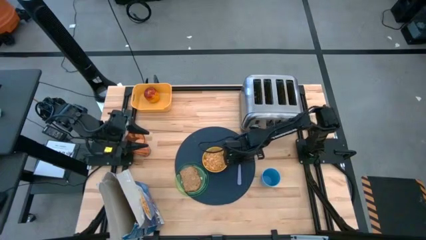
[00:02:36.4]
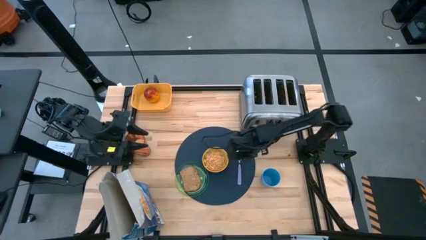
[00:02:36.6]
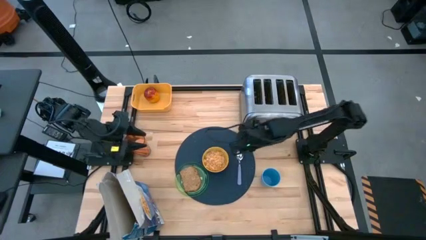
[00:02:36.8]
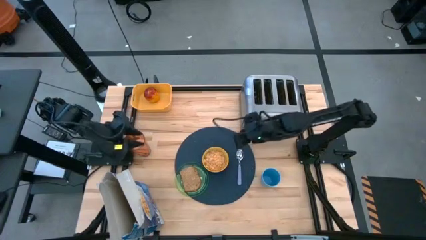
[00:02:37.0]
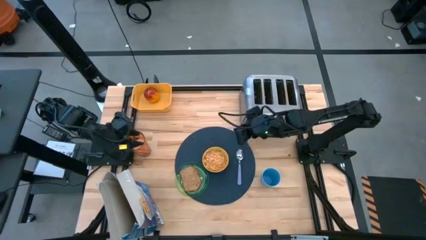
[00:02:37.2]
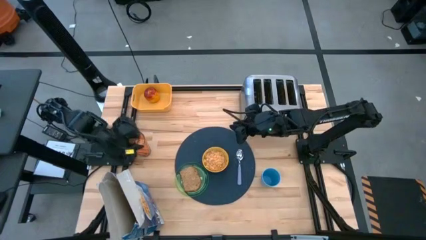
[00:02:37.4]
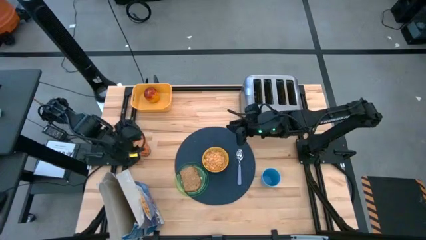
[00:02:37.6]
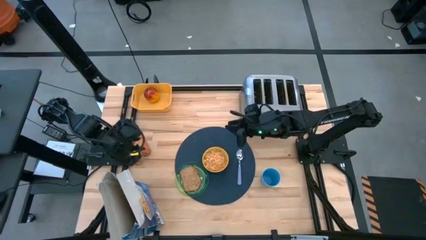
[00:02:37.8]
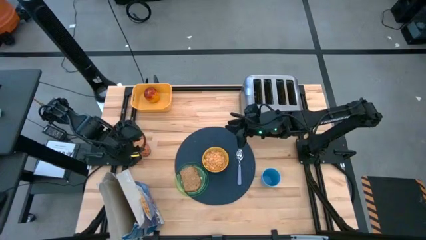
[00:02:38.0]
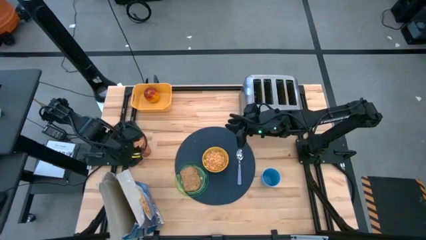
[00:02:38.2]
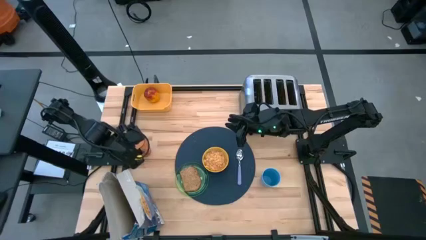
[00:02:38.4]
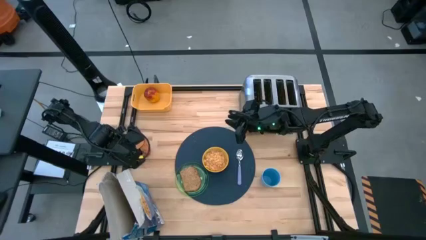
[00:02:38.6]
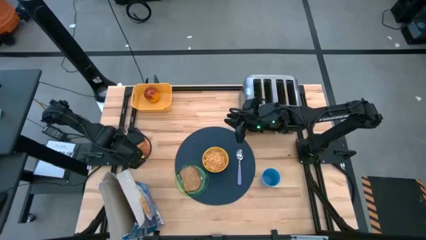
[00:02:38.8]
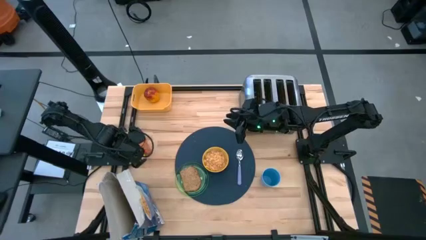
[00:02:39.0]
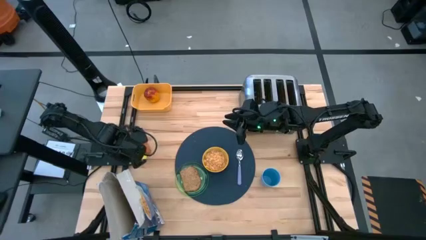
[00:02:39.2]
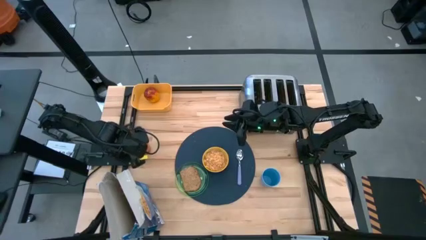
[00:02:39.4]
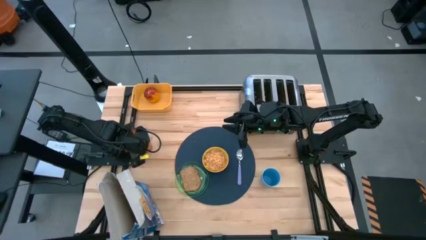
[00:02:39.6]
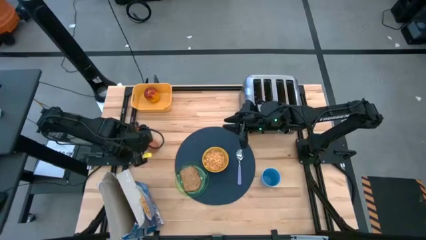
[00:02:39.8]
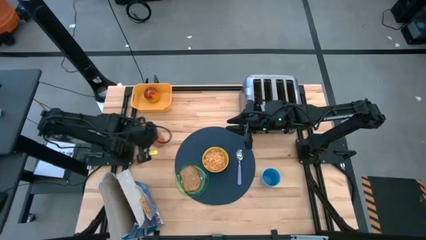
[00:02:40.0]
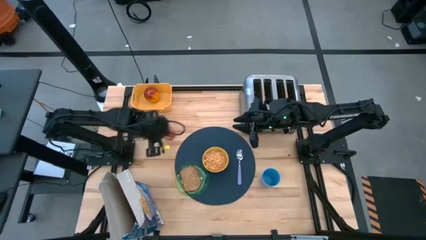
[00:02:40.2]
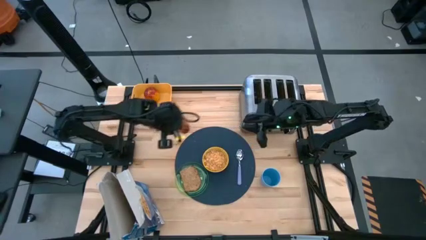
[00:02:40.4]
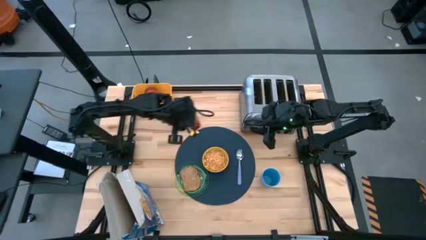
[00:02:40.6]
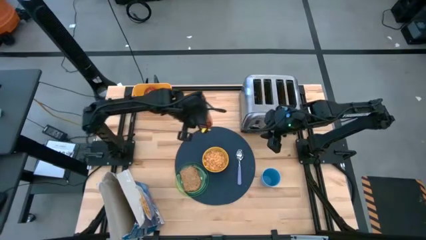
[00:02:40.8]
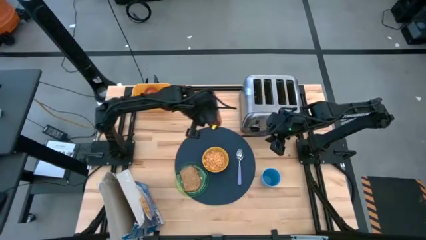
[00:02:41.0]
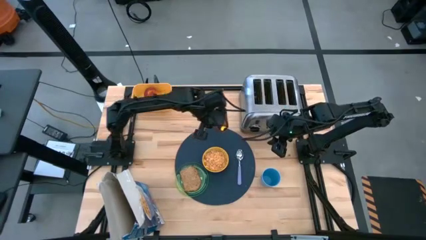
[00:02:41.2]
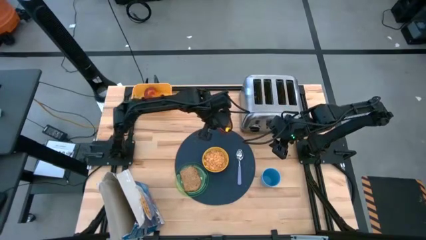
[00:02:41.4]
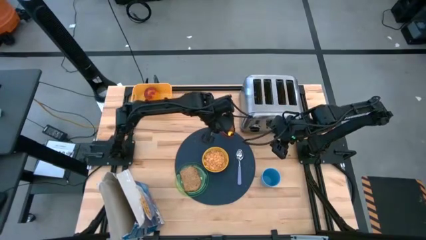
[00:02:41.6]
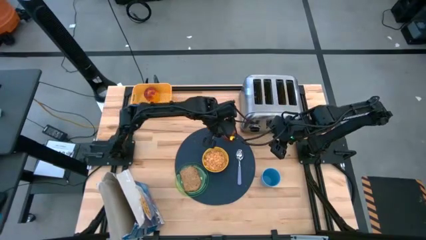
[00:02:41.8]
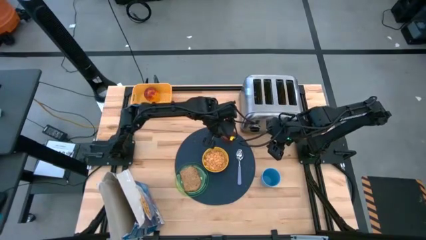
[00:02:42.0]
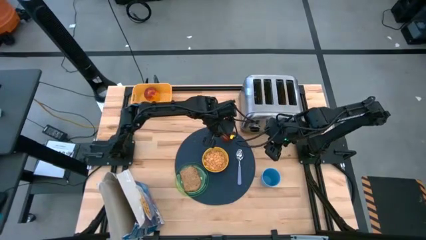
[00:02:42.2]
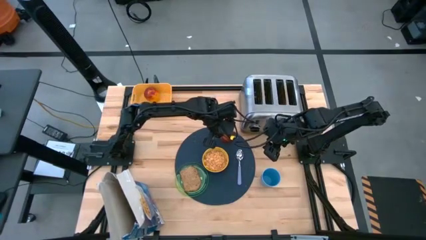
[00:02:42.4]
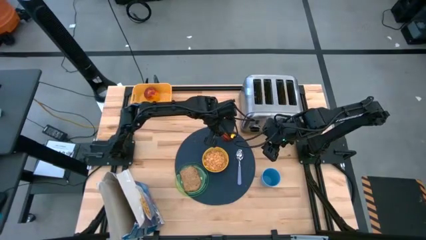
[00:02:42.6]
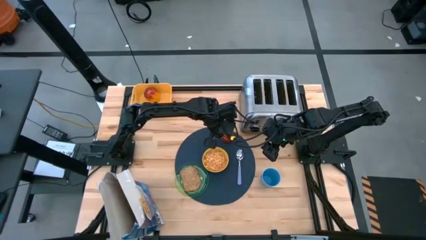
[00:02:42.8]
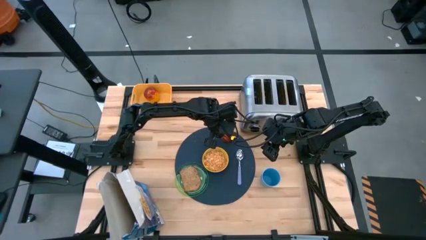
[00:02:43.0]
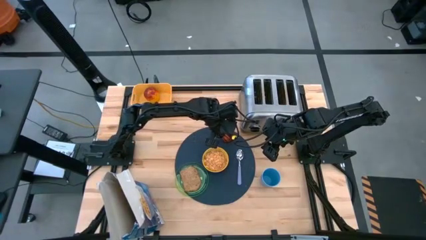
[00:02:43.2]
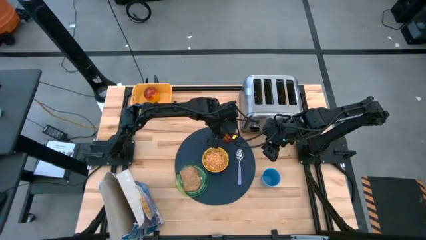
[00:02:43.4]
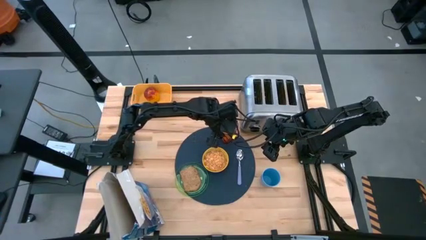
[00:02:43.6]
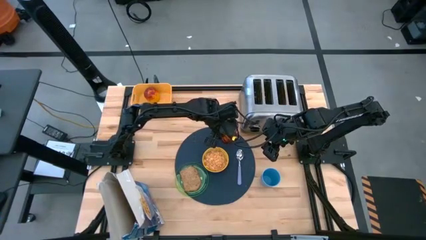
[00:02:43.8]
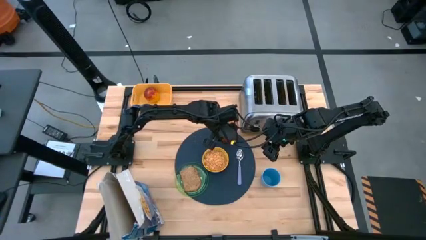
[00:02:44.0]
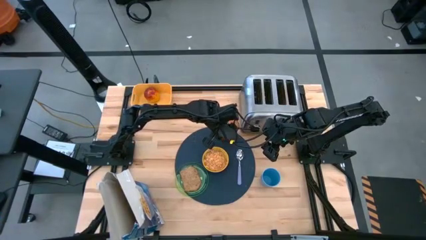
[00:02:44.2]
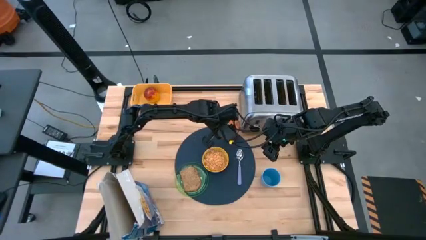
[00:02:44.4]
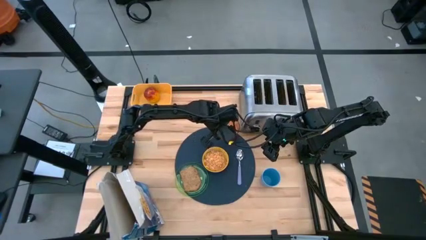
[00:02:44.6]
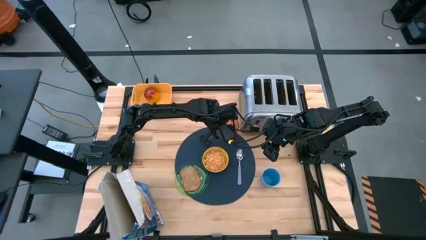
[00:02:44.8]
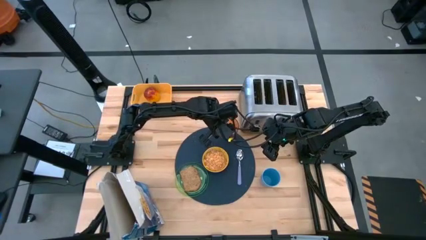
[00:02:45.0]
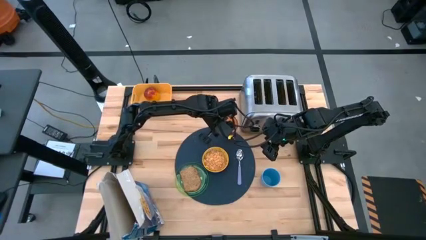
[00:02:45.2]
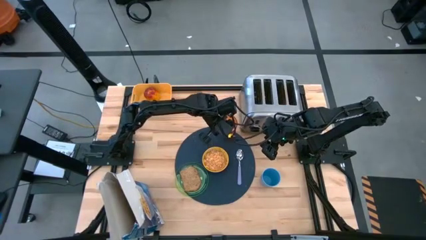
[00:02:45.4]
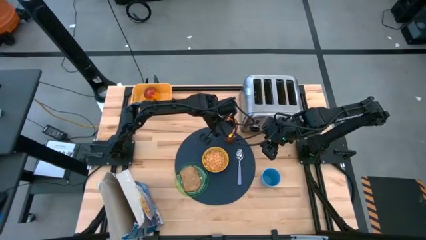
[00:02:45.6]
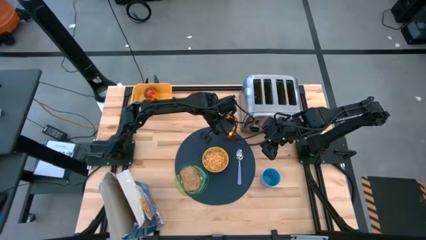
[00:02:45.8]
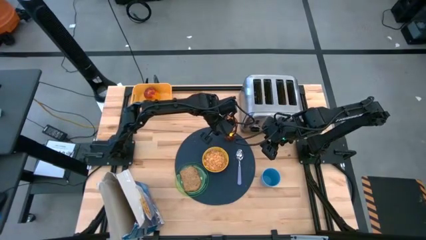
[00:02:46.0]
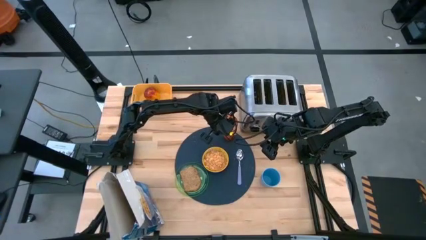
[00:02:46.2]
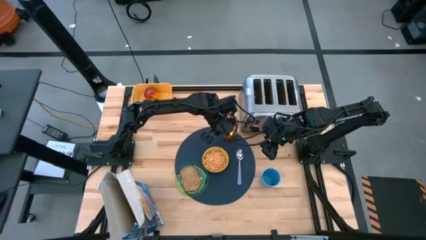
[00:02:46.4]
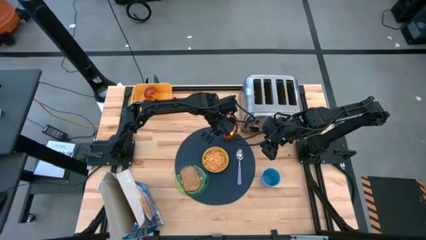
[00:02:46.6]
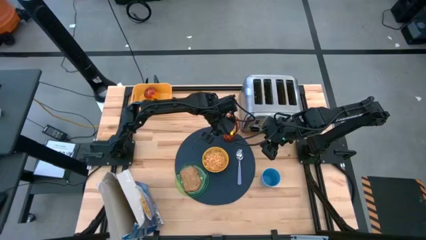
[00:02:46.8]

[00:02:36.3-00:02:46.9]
Task: Arrange a breakfast setting
Put the orange glass on the dark blue table mat to the top of the light dark blue spoon
